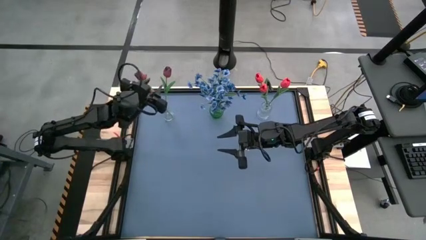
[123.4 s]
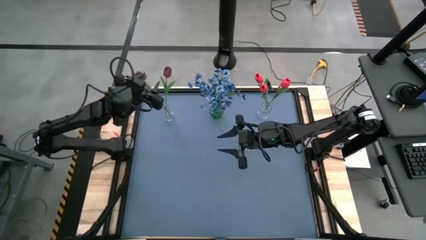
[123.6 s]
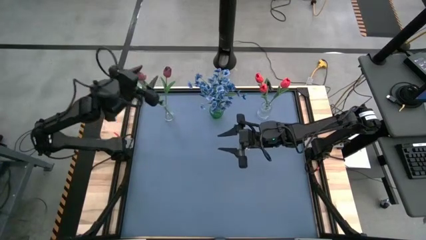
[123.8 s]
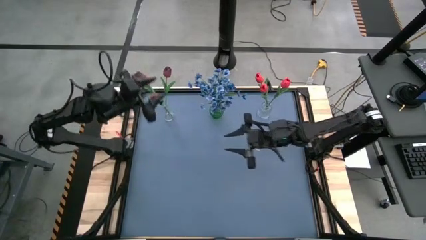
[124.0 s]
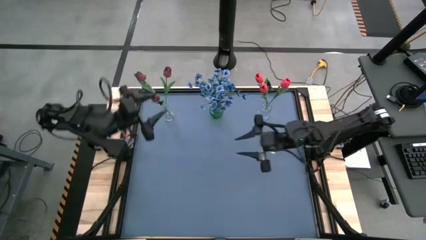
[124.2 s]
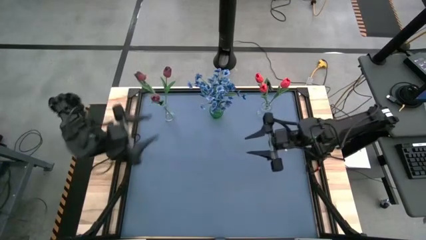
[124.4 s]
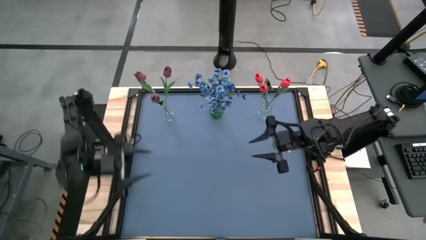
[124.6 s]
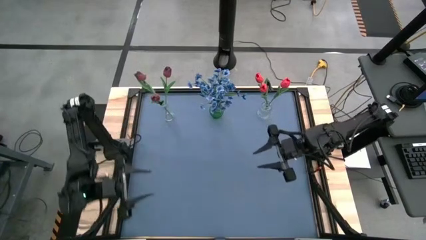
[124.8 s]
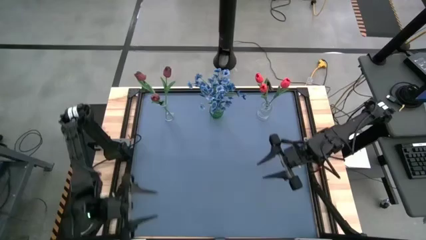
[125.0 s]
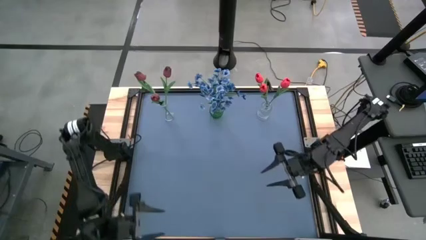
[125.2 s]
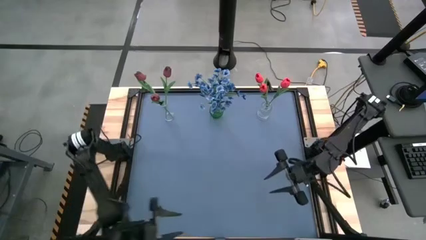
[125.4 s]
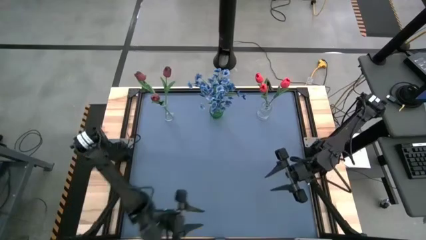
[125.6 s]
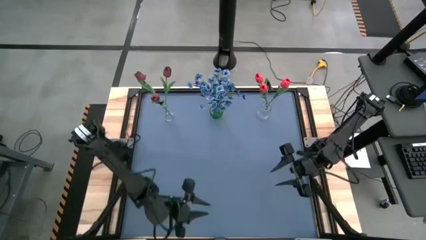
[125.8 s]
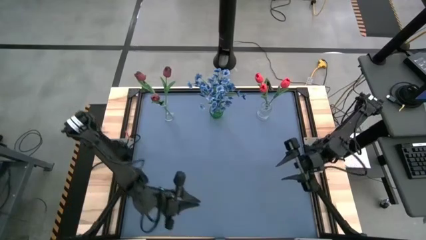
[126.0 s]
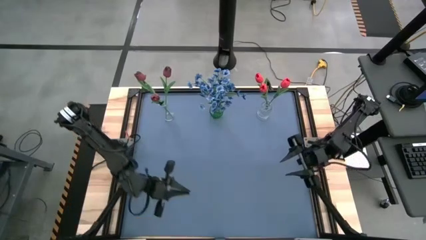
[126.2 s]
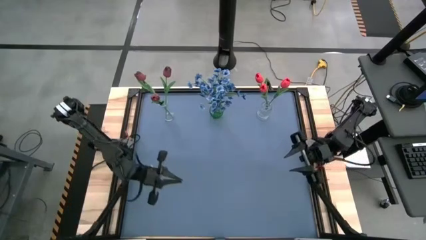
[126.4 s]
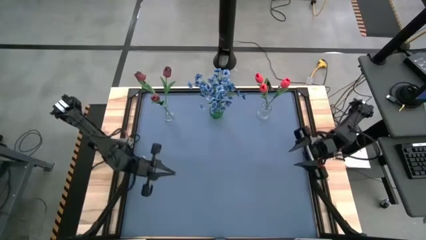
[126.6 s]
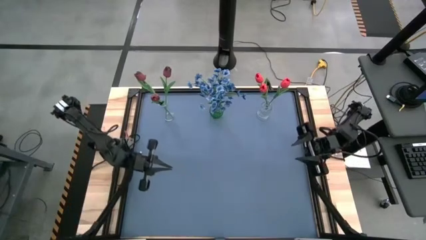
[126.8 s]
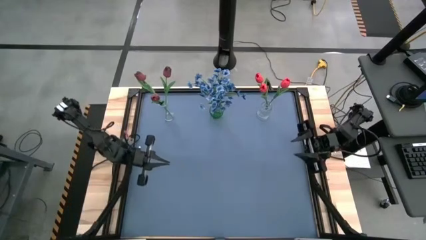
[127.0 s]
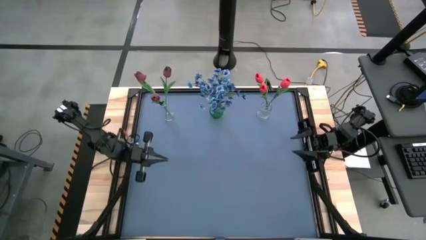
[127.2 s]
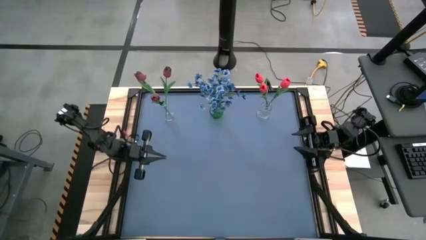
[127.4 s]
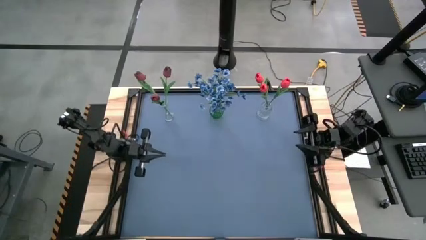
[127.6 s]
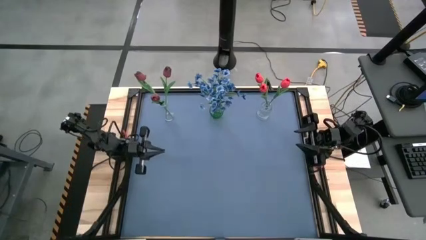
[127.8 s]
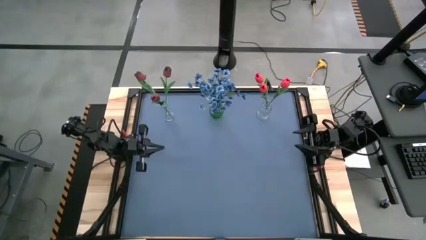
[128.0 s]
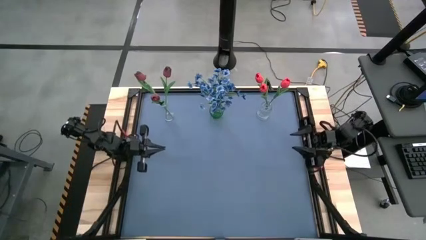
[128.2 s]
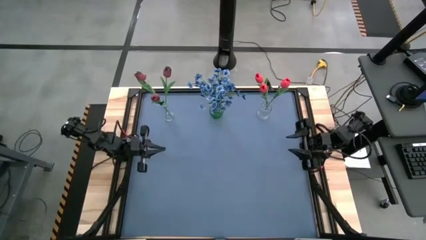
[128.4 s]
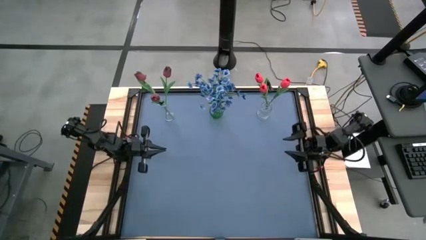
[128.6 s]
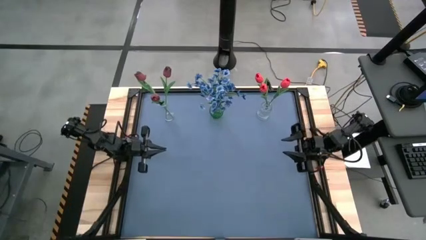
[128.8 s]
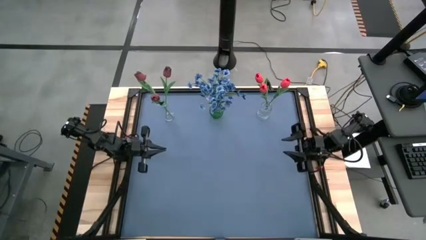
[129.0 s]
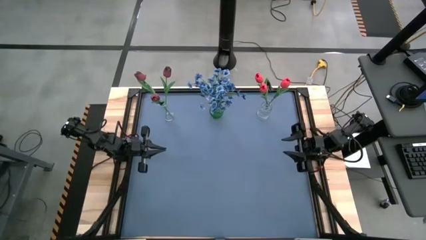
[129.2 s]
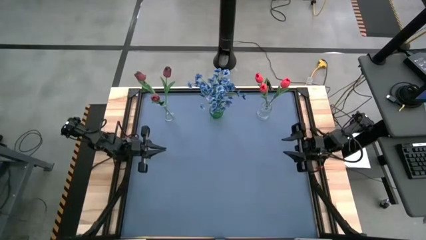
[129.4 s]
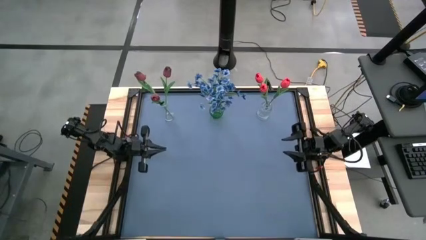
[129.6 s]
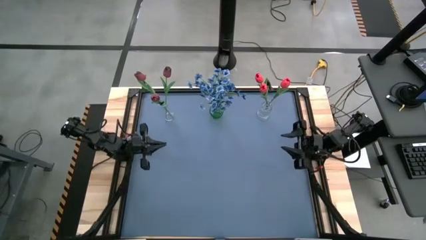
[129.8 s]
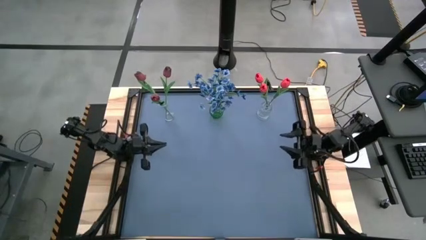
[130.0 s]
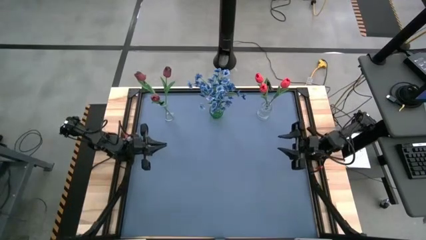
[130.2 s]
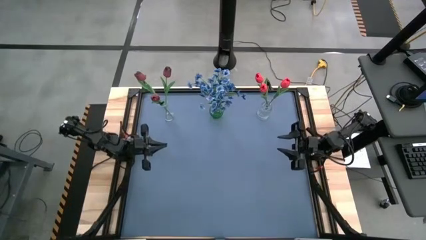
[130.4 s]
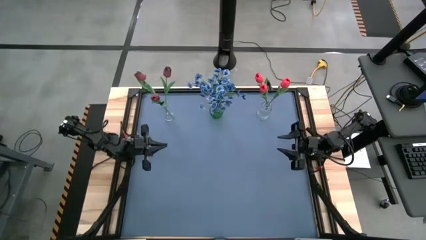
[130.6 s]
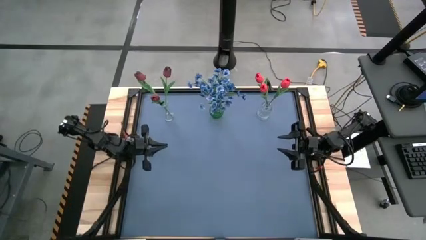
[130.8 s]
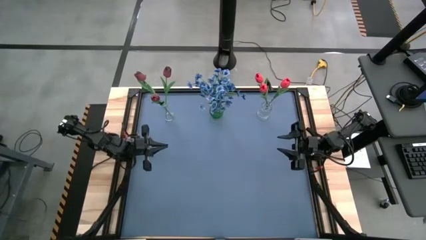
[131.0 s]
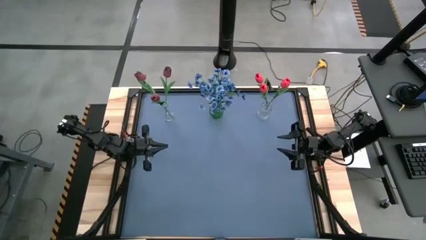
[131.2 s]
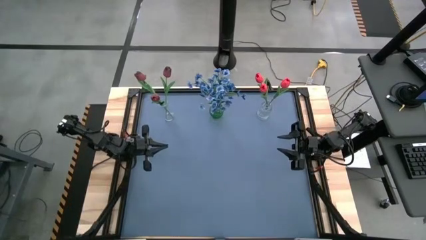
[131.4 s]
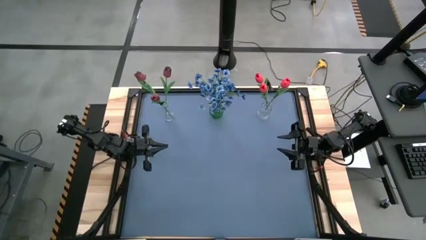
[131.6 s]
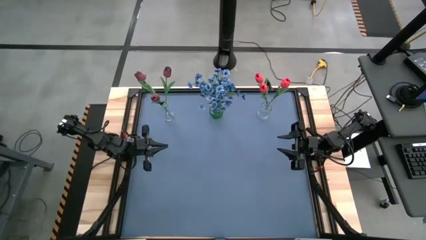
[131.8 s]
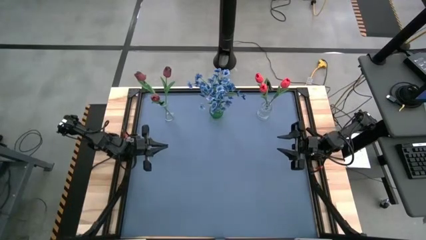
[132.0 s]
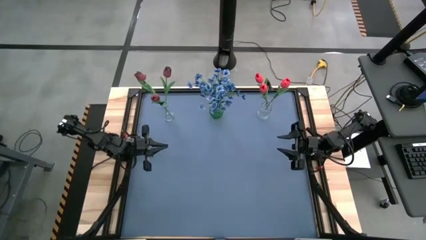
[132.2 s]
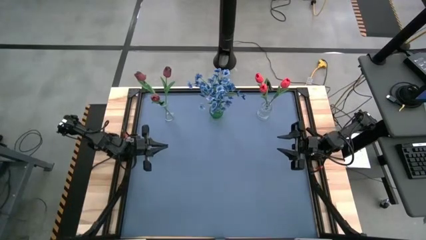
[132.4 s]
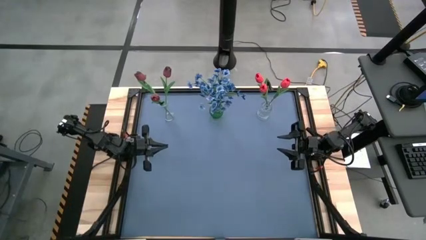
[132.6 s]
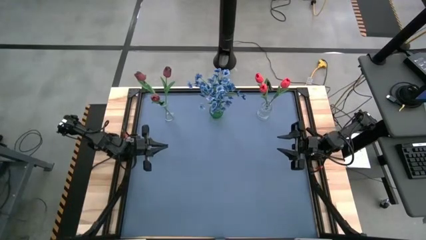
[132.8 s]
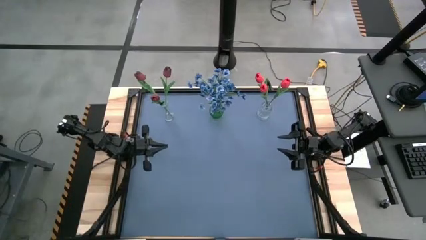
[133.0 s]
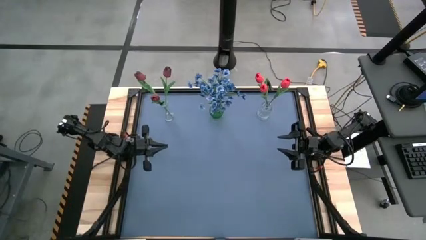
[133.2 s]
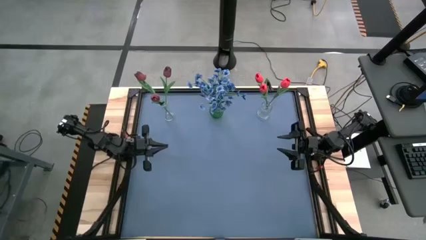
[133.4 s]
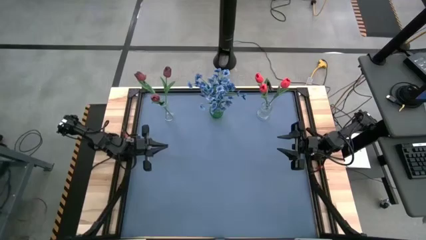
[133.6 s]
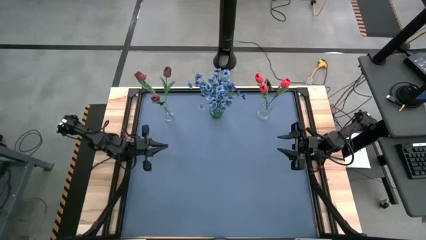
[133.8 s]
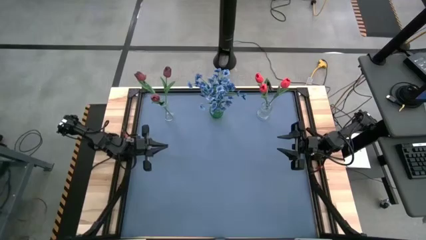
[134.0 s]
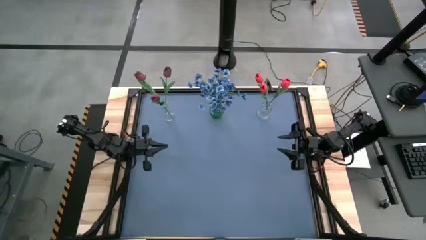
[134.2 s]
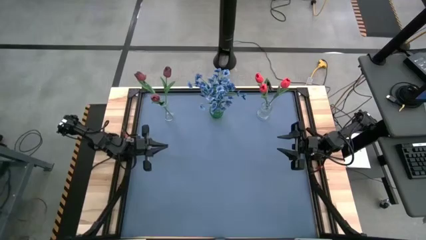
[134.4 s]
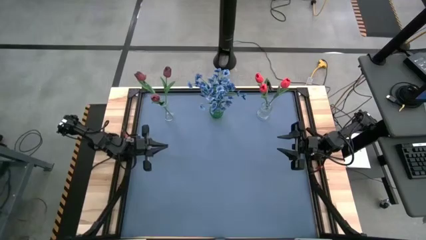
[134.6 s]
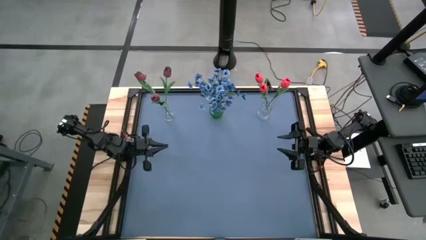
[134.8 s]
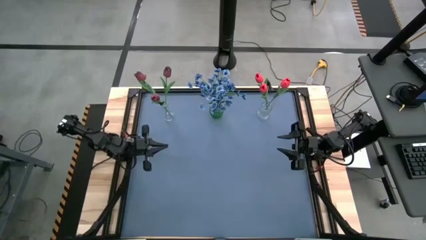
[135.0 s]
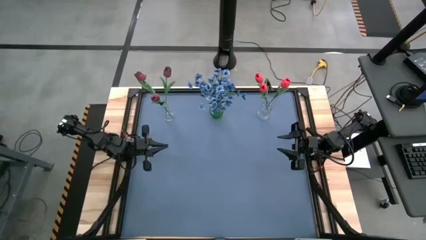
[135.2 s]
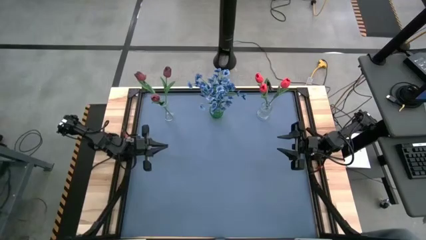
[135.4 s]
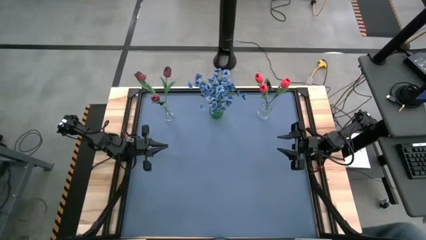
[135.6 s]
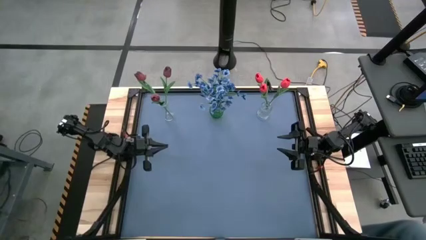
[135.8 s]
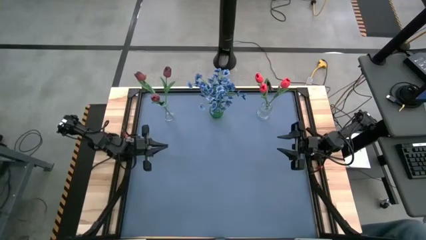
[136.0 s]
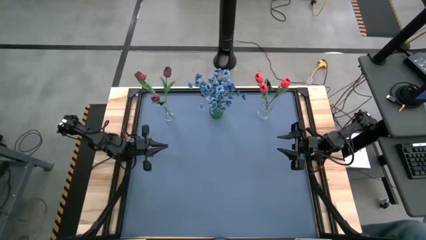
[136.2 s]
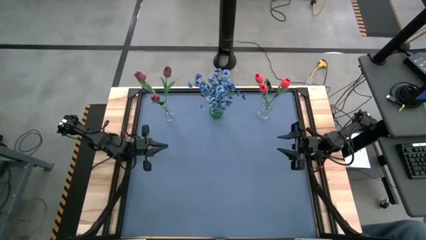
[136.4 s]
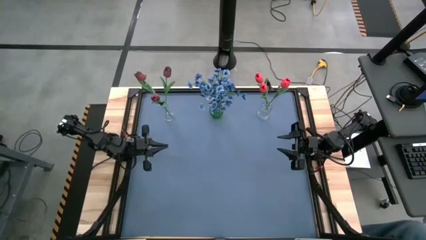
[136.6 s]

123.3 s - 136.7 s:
Task: Sort flowers into vase by color
Return to Home Position
